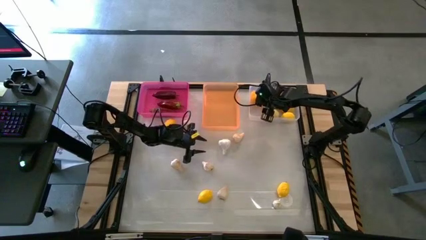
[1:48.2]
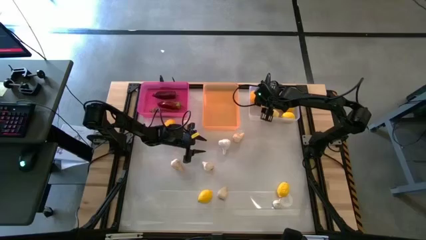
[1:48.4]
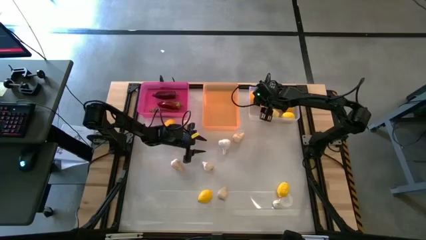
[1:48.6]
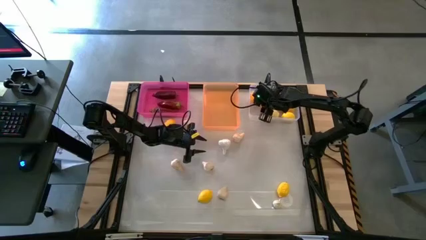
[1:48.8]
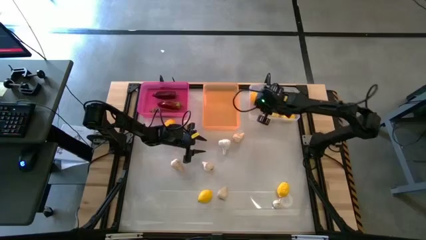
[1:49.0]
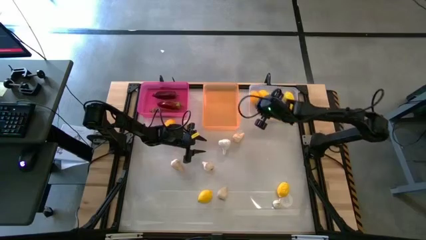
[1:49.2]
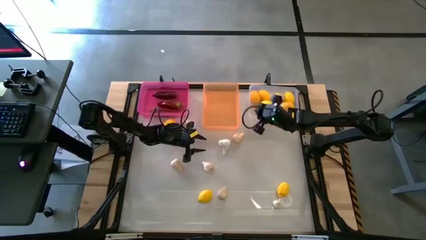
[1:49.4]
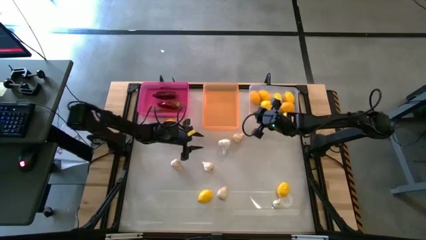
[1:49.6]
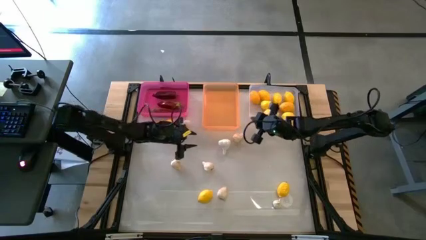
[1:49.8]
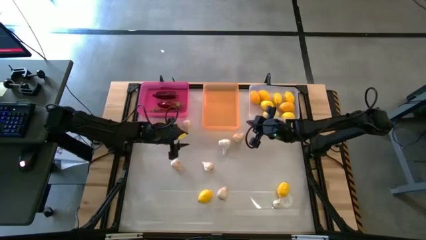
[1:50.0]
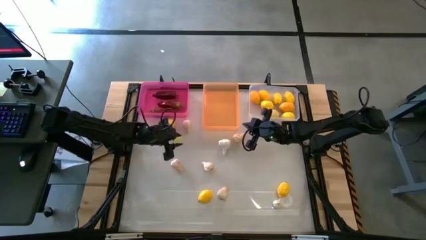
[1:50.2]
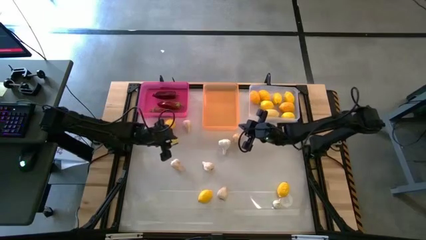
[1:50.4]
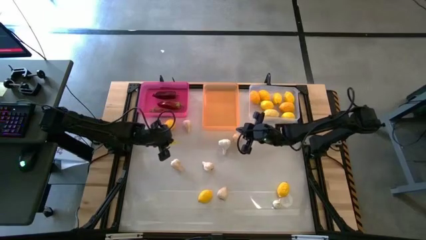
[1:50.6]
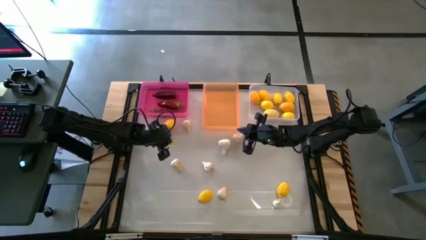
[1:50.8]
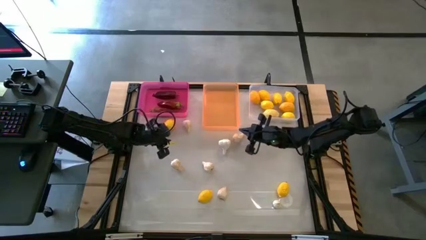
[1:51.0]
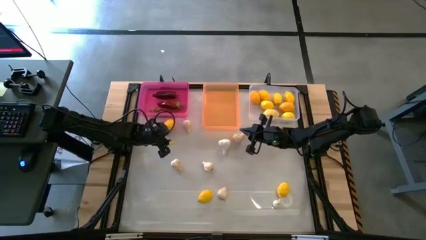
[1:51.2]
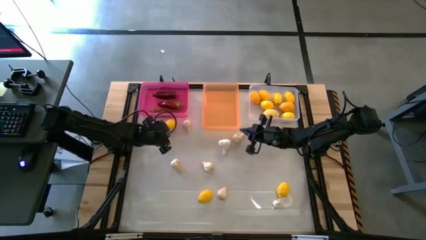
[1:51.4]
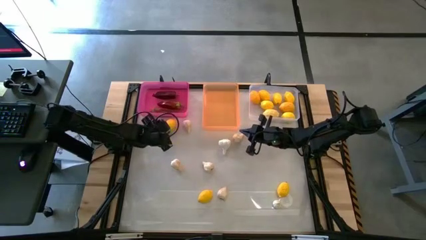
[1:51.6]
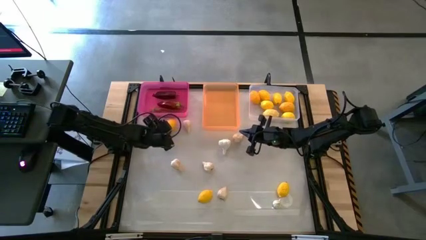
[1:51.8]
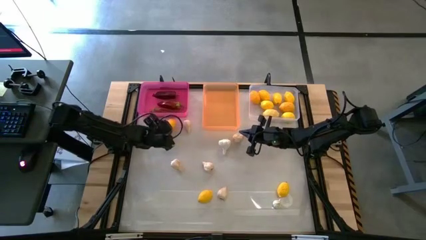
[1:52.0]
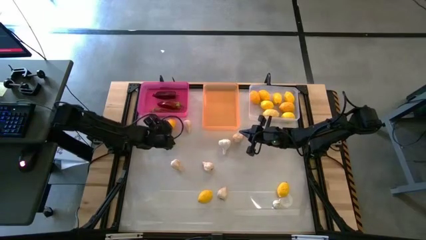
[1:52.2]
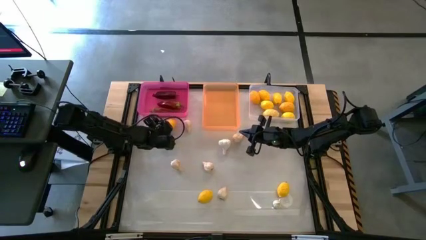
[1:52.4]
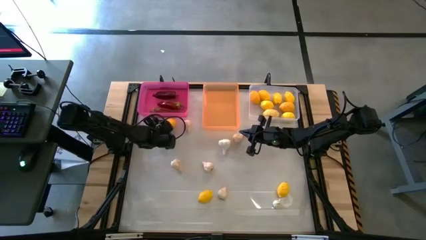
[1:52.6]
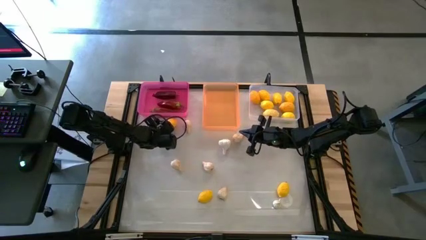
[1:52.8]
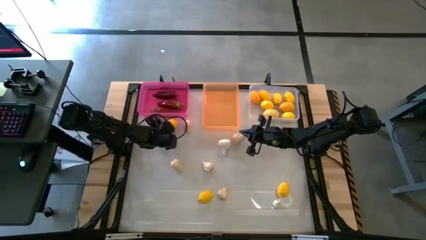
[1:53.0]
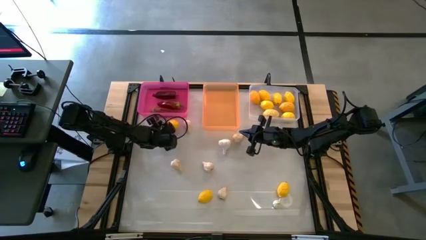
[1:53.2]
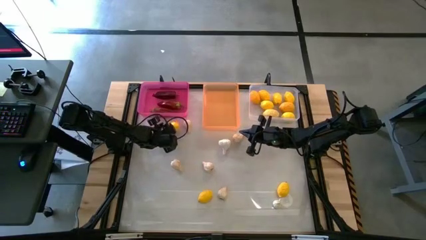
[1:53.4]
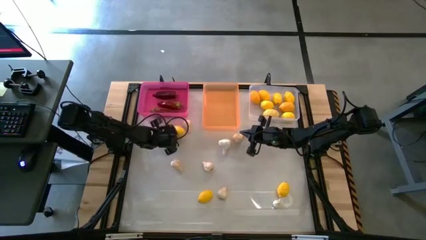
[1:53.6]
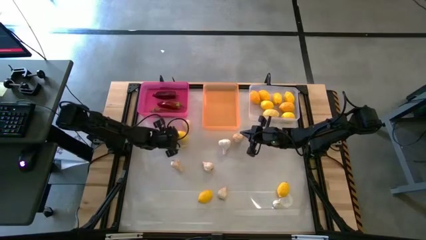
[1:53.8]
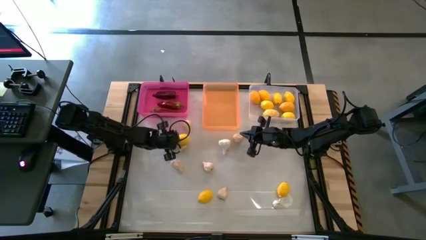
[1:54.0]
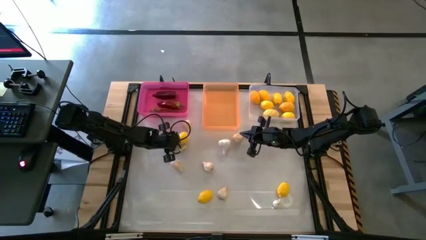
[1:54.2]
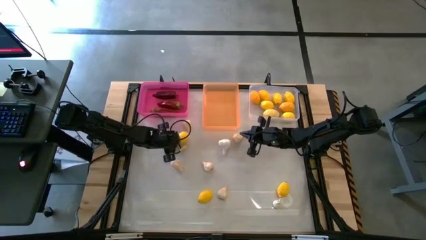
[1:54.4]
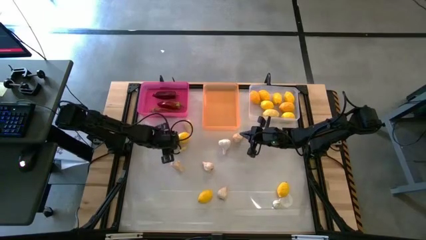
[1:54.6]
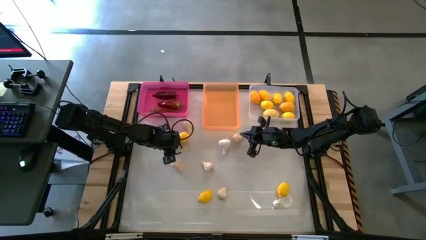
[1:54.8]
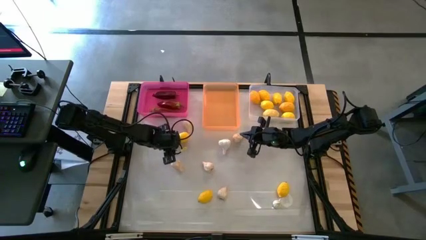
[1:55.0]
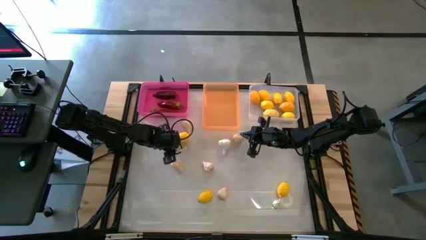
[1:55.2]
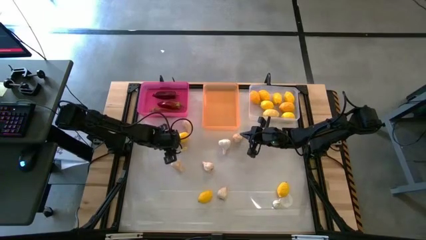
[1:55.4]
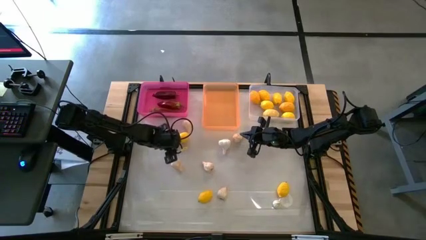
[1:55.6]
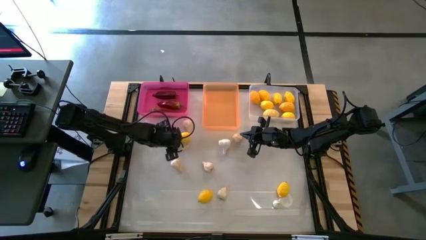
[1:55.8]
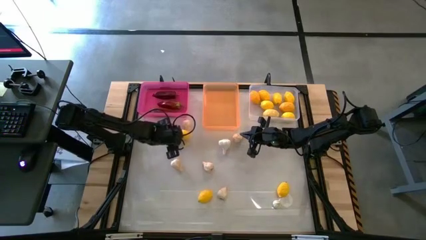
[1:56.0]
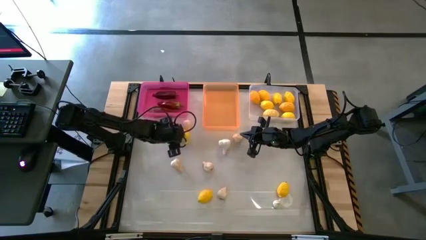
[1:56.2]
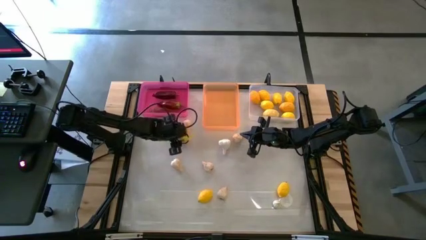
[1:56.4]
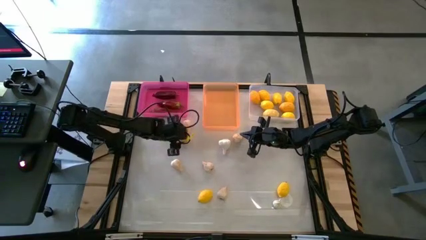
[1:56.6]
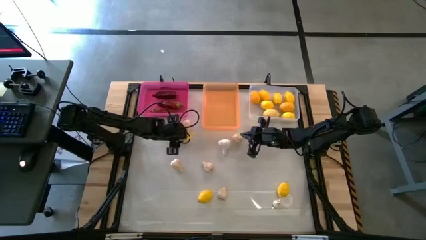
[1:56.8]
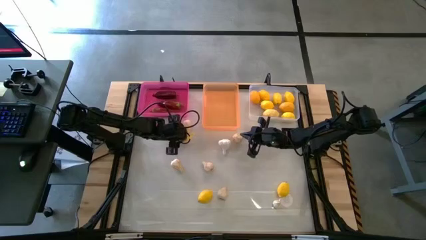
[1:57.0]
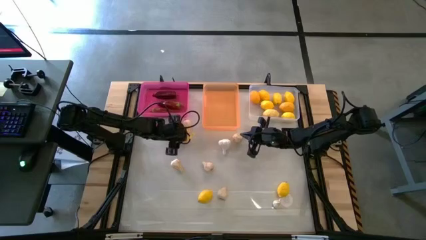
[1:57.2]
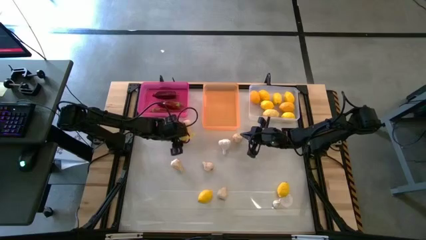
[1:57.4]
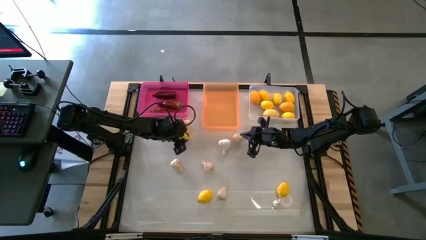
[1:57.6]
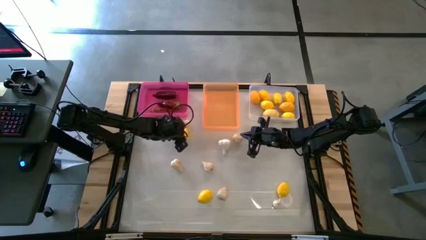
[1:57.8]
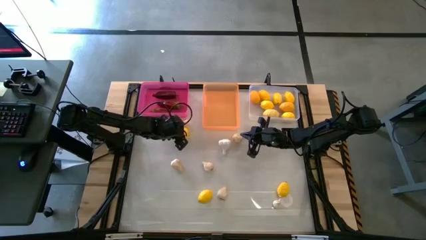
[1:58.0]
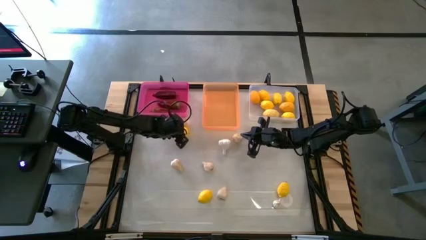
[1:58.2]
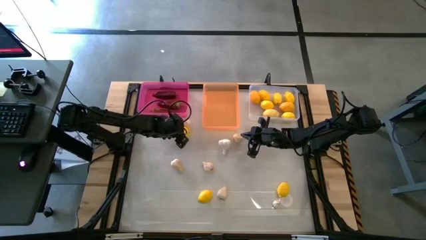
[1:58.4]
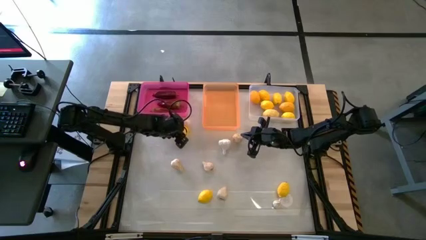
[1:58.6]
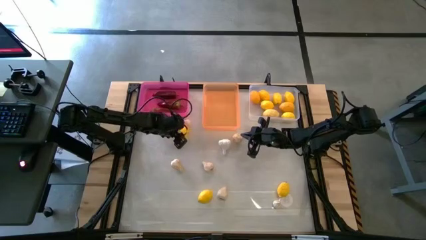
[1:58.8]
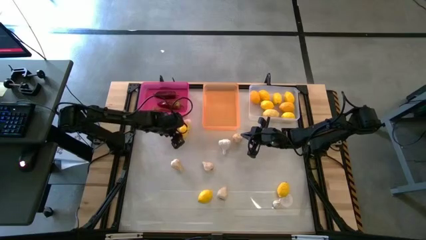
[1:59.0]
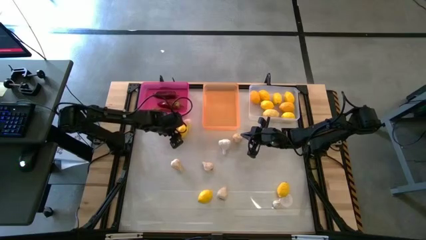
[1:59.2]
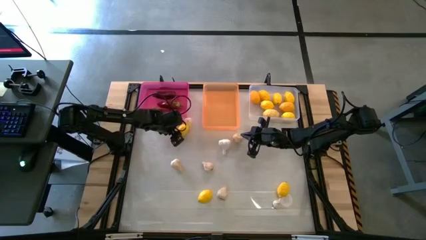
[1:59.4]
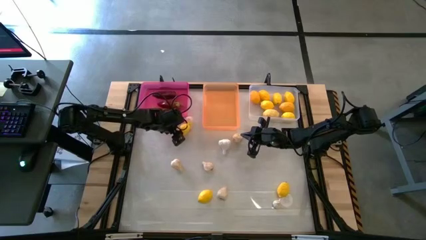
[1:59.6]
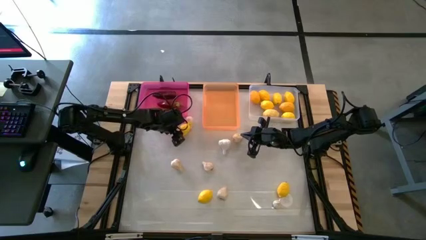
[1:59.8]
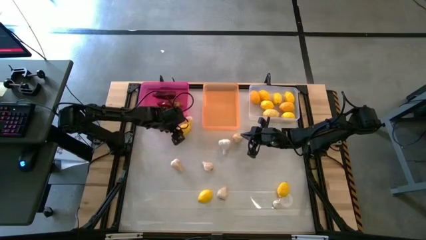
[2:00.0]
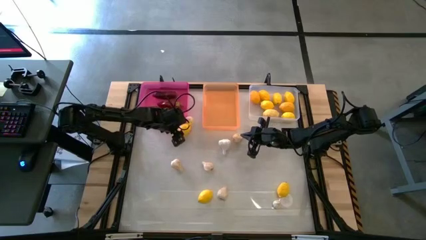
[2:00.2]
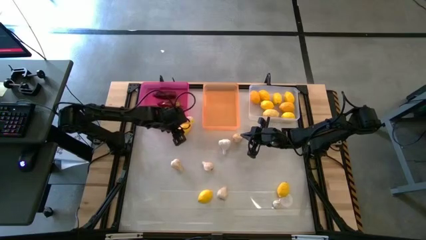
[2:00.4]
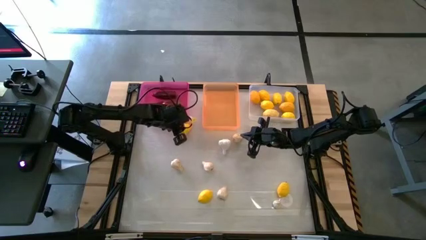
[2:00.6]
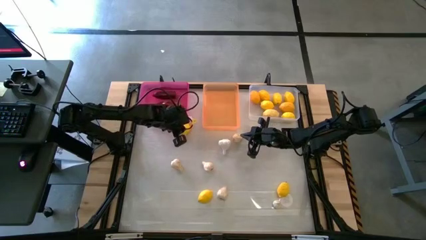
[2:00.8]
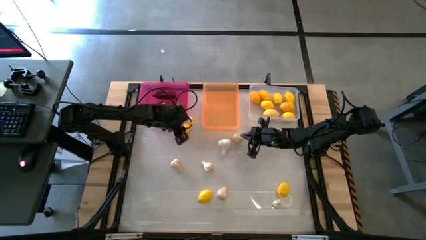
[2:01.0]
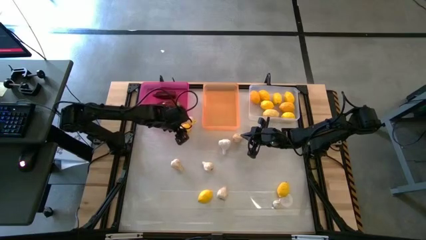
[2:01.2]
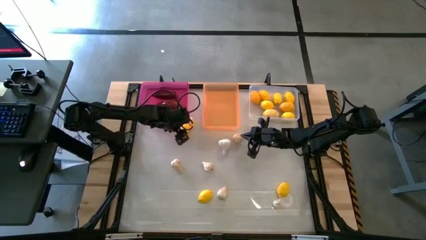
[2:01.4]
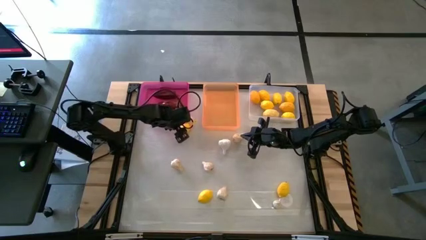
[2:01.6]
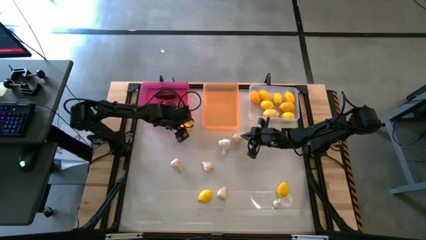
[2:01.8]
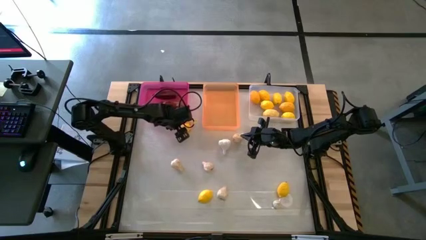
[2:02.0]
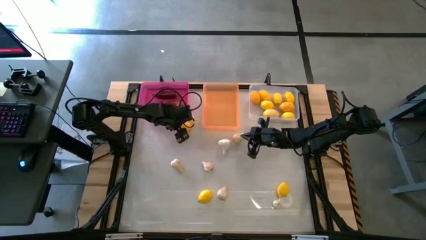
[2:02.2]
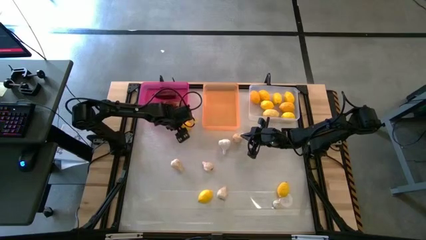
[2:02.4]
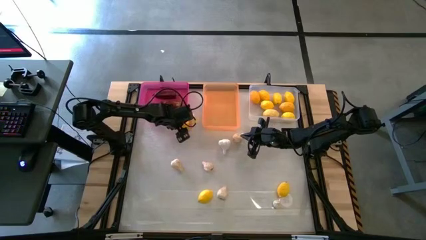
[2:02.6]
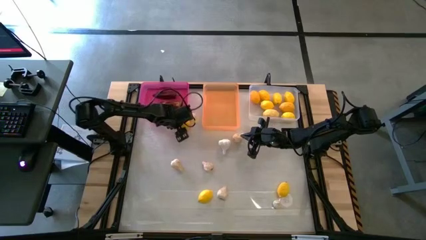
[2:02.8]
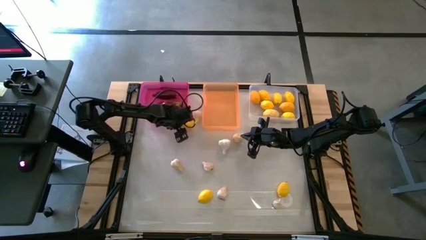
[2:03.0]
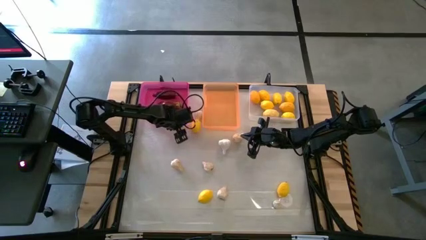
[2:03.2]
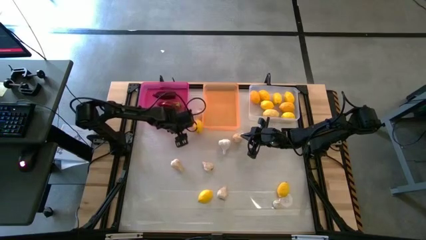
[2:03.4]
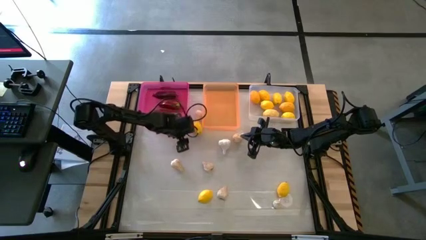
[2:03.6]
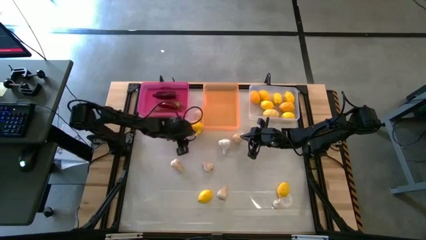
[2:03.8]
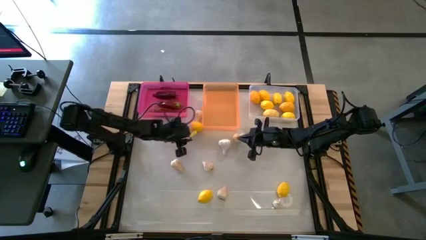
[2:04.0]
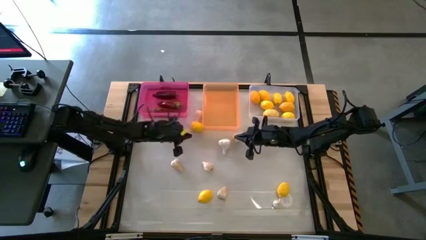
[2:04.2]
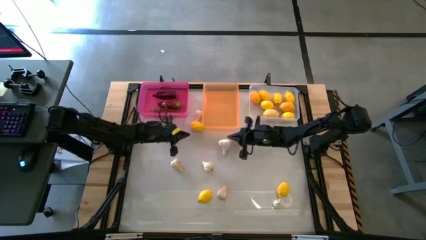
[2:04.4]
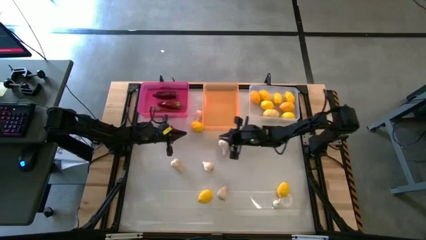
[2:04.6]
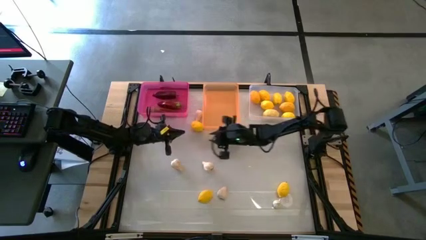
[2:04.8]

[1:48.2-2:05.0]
Task: Sort produce into baskets
Put the yellow lemon into the transparent bin
